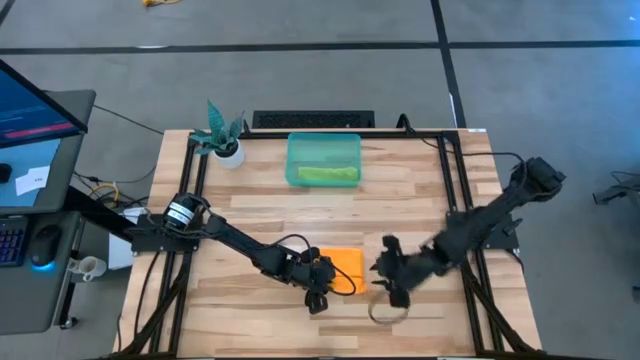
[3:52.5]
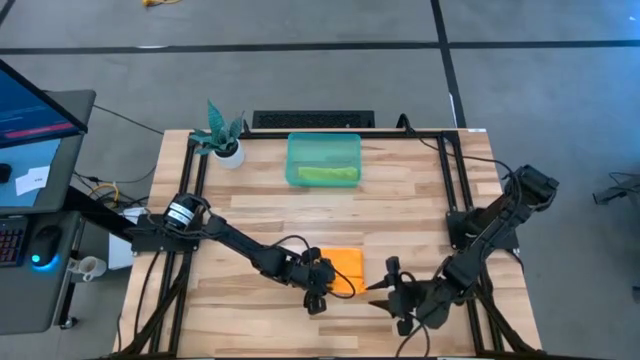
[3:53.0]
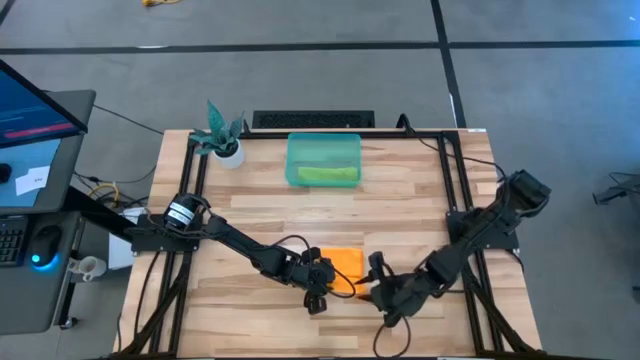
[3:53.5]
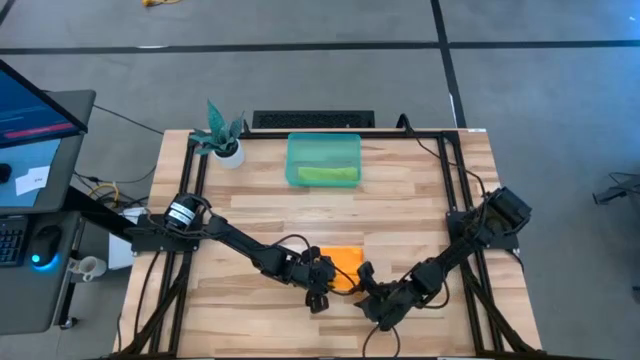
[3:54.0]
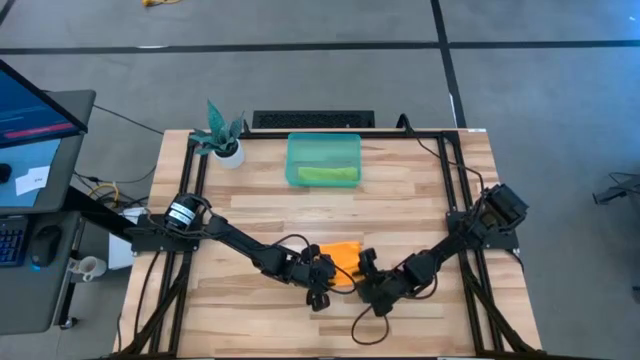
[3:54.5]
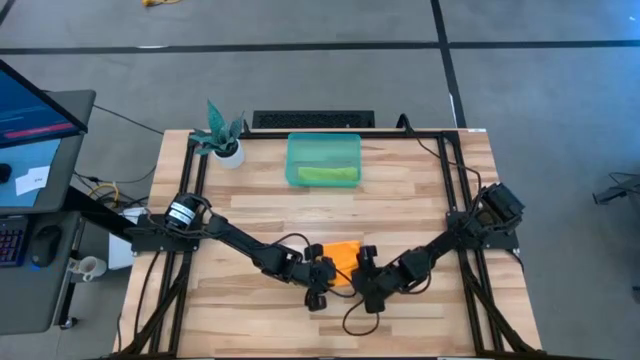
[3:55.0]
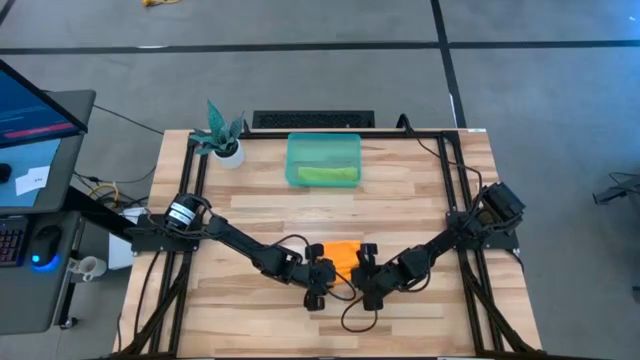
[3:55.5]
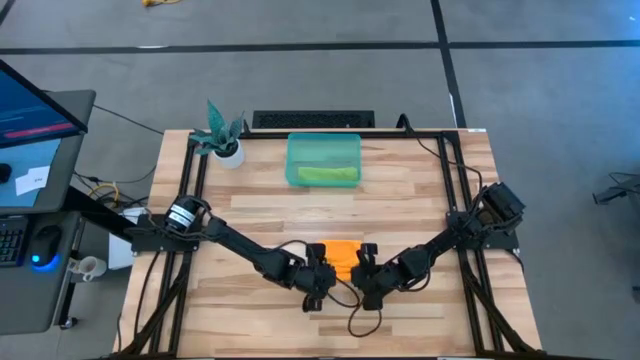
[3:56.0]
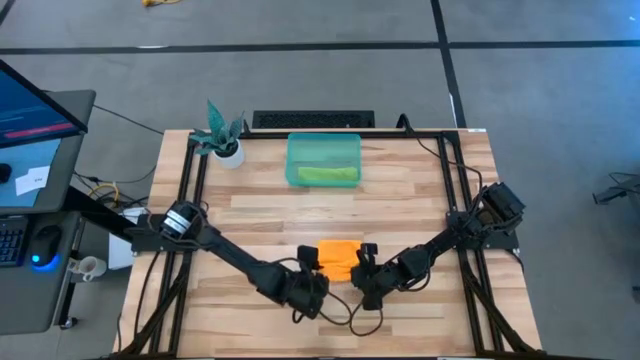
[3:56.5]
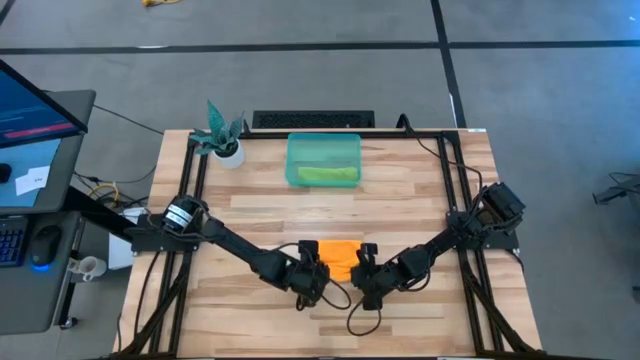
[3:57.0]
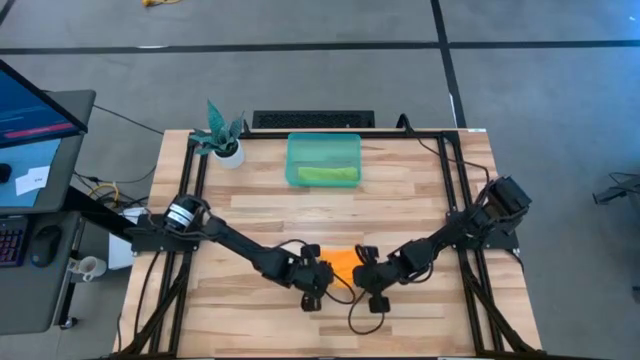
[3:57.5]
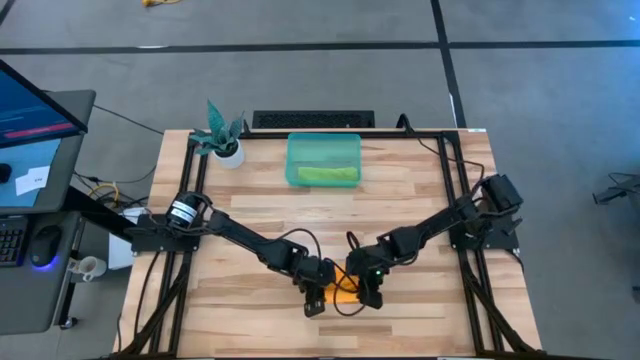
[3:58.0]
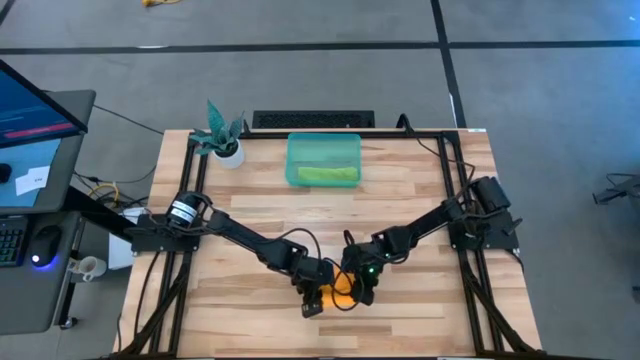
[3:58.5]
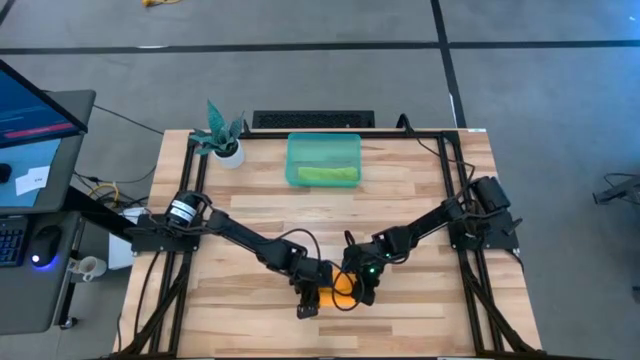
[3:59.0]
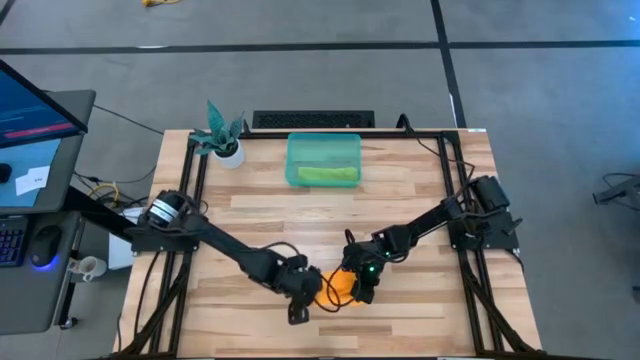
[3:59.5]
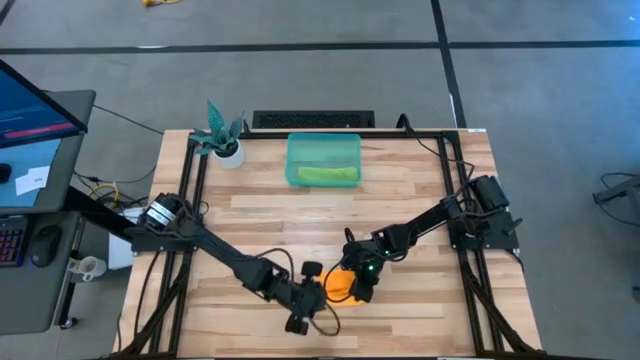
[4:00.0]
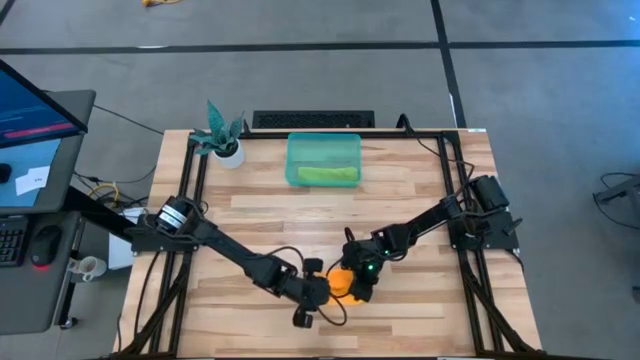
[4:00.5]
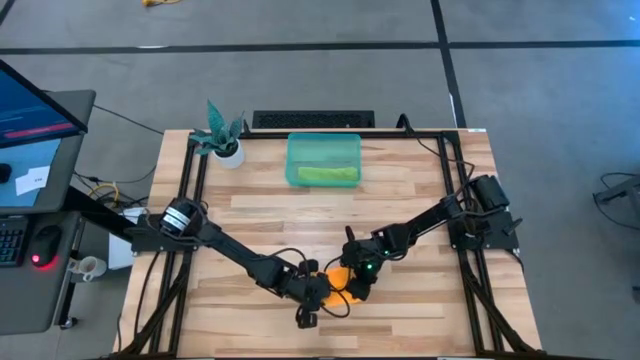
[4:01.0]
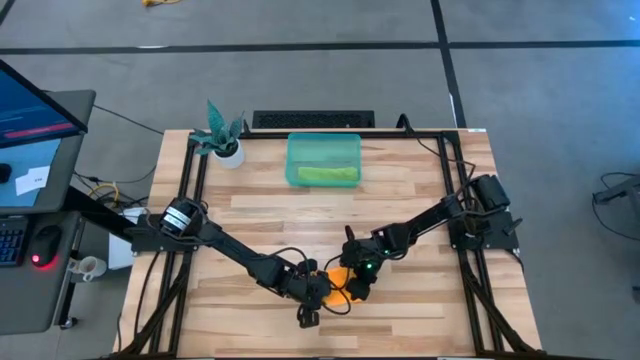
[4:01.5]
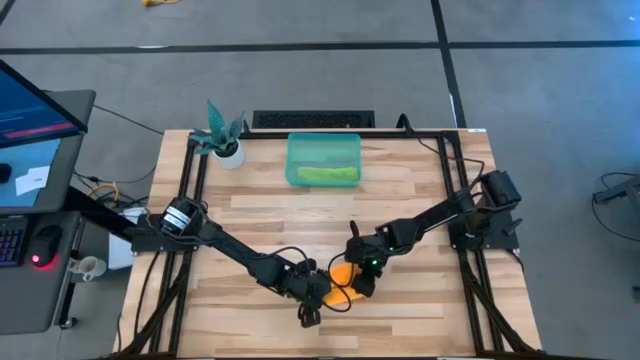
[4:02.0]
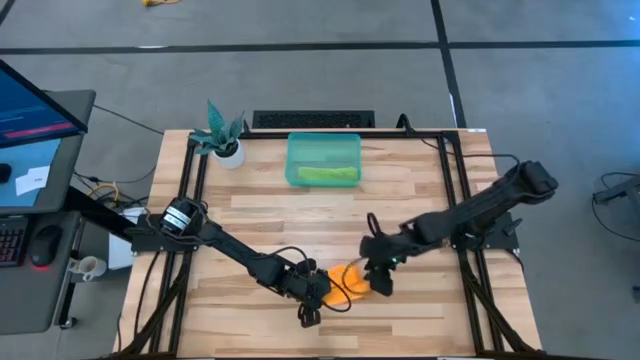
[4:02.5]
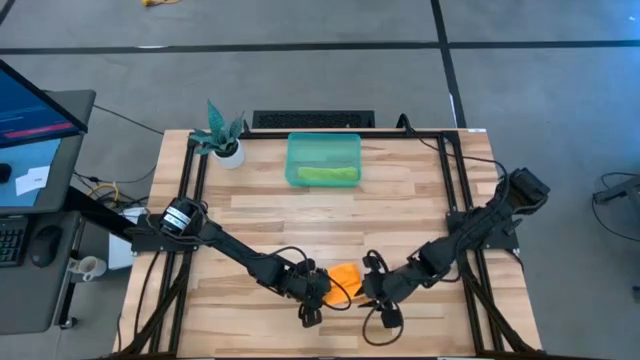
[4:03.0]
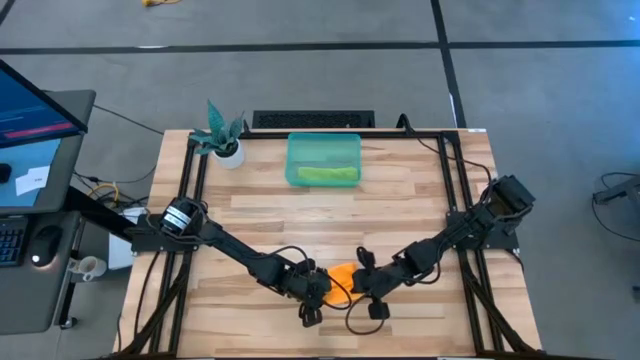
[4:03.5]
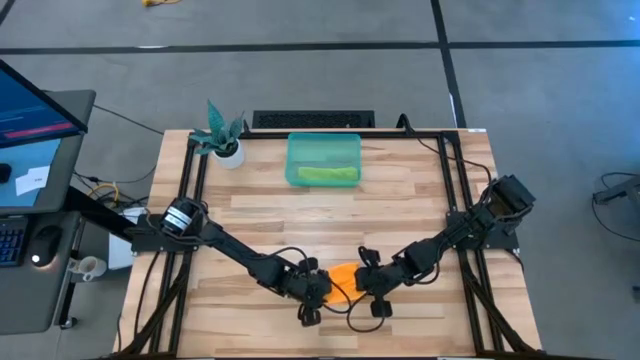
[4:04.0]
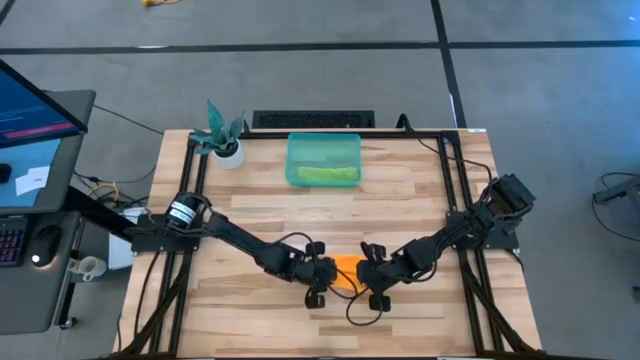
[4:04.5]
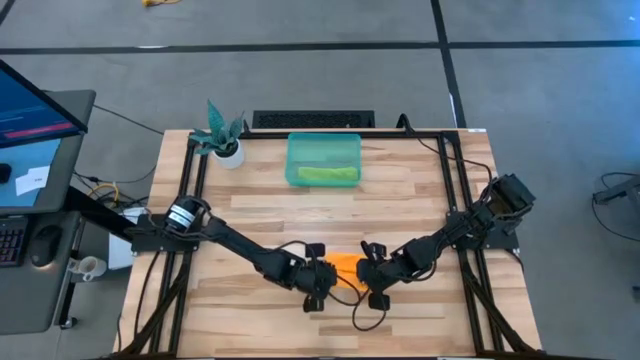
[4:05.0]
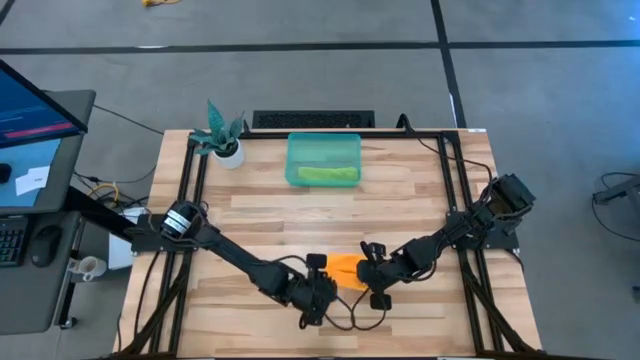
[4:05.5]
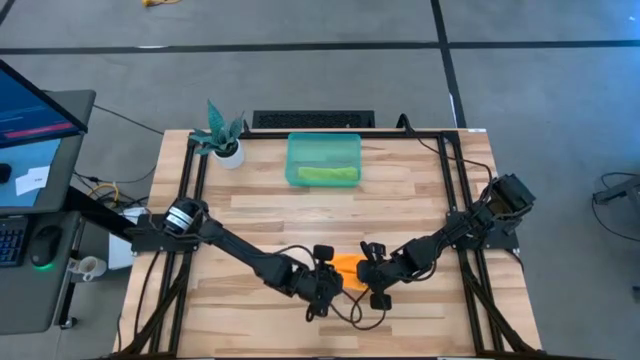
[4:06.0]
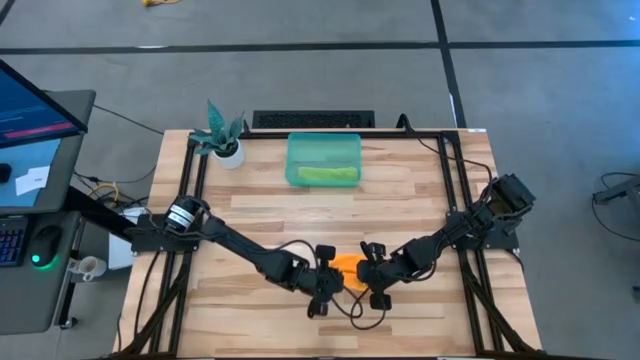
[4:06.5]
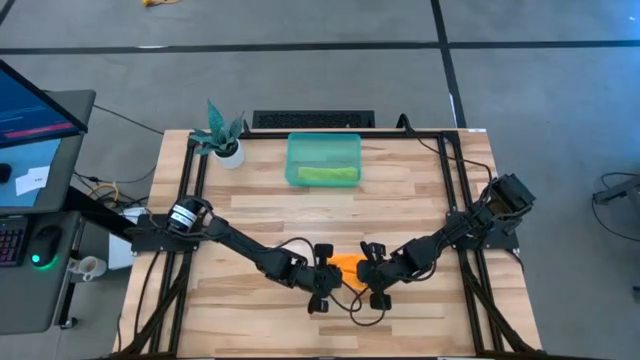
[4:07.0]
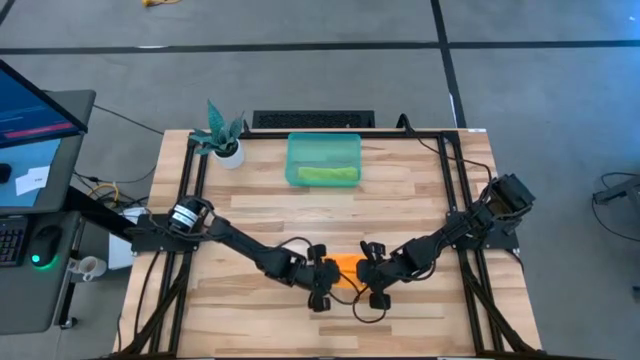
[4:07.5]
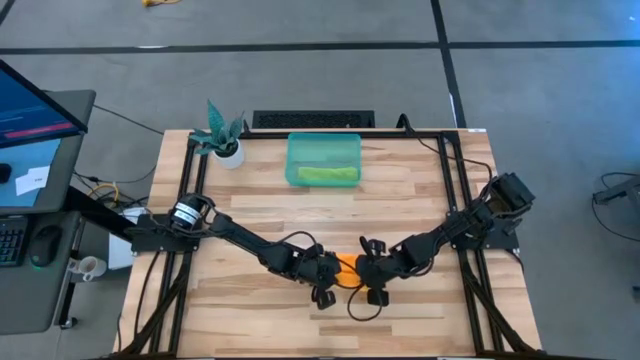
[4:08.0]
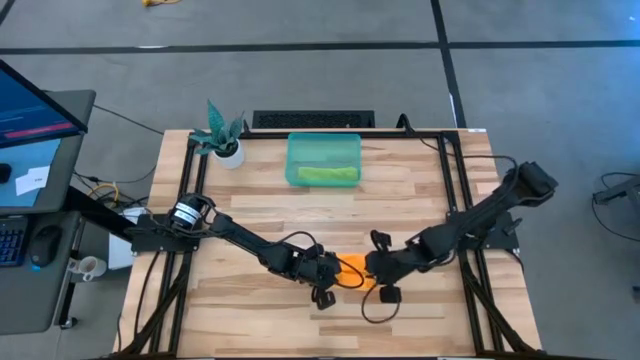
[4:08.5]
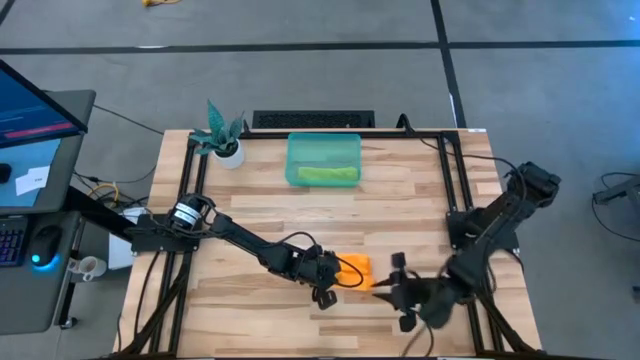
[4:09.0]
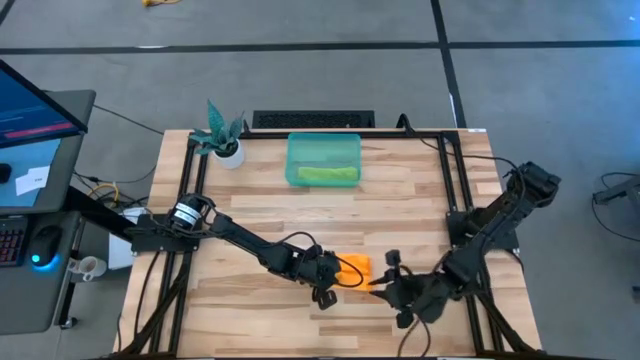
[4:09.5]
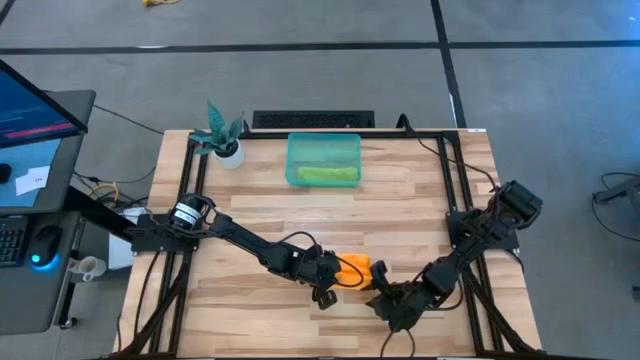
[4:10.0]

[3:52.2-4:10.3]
Task: Roll microfiber towels into tight, uniform cylinder then place into a basket
Roll the orange towel
